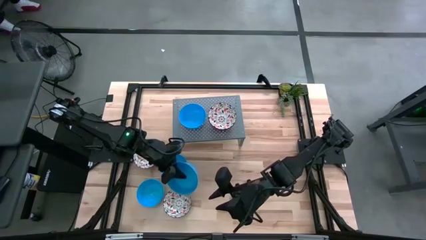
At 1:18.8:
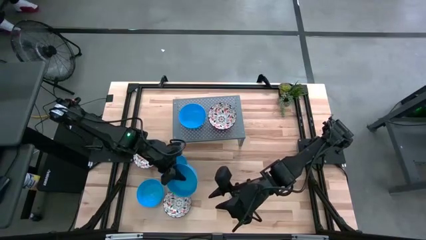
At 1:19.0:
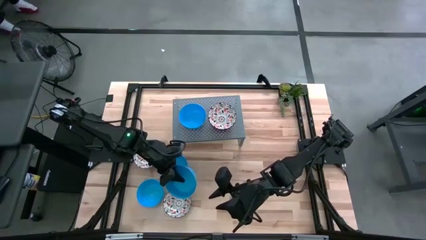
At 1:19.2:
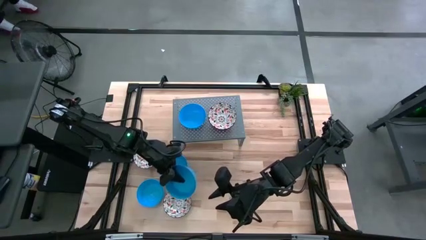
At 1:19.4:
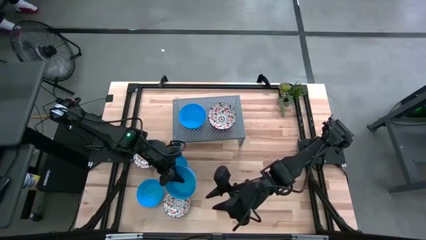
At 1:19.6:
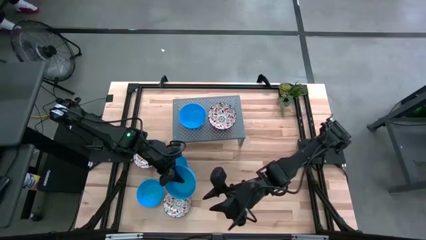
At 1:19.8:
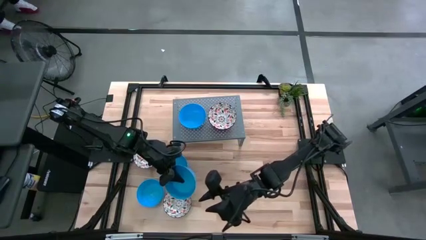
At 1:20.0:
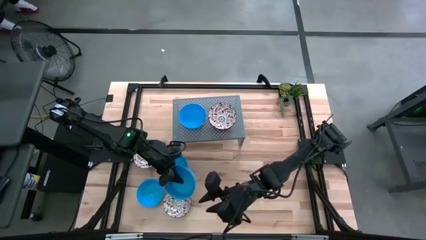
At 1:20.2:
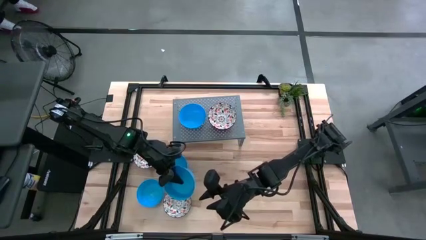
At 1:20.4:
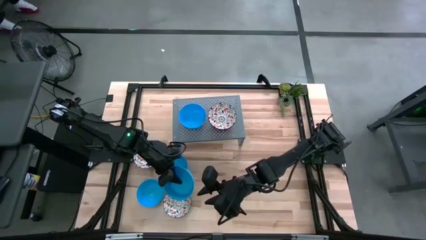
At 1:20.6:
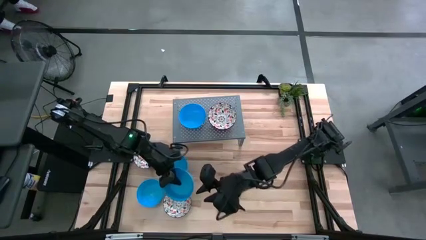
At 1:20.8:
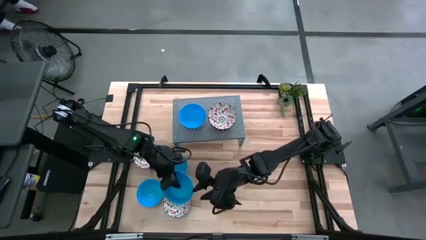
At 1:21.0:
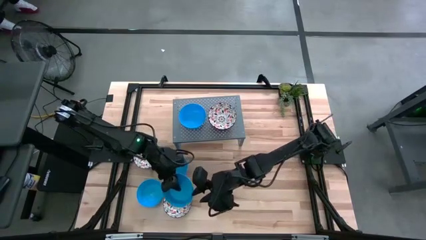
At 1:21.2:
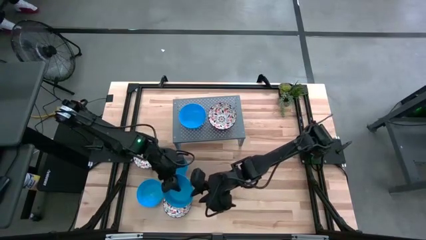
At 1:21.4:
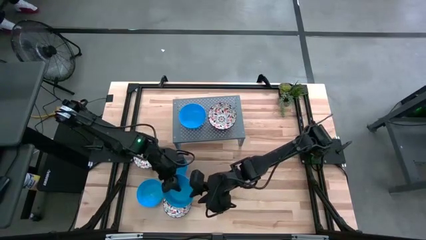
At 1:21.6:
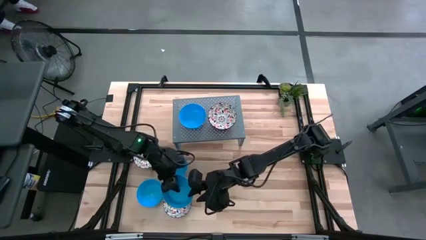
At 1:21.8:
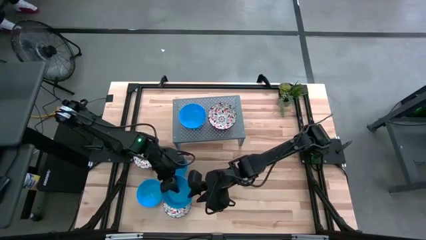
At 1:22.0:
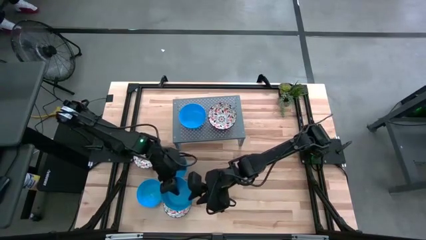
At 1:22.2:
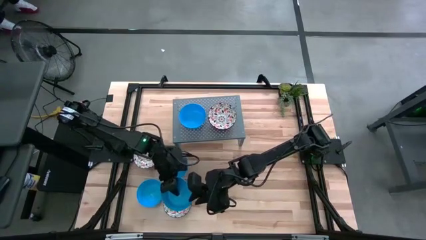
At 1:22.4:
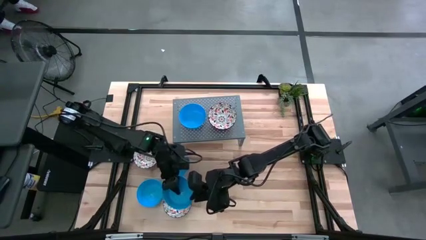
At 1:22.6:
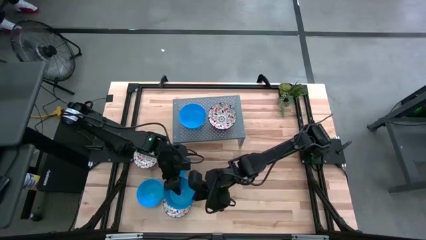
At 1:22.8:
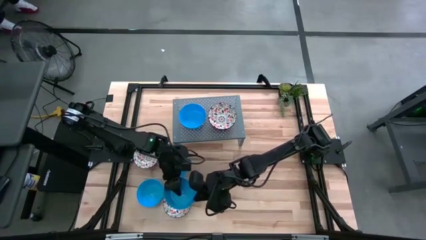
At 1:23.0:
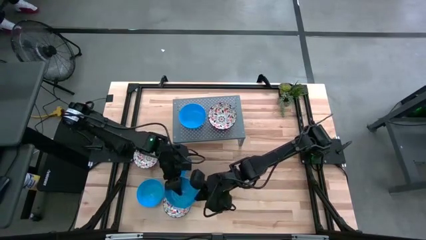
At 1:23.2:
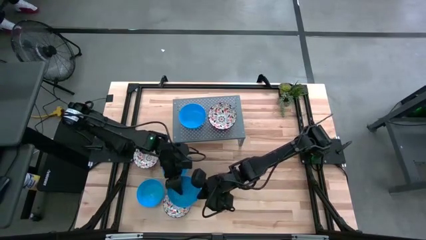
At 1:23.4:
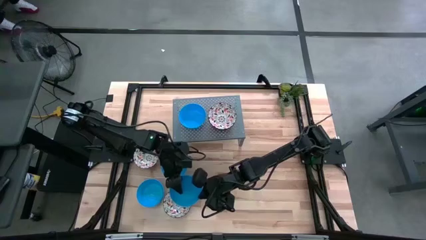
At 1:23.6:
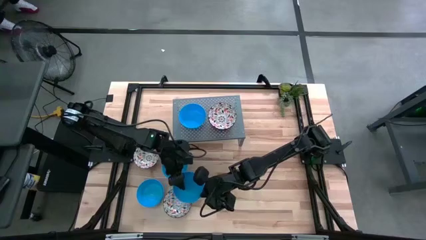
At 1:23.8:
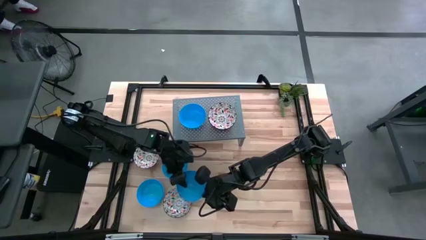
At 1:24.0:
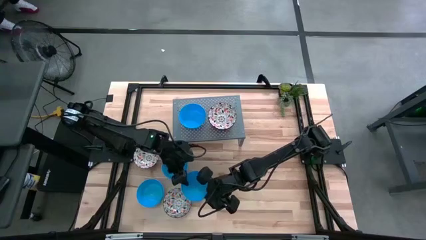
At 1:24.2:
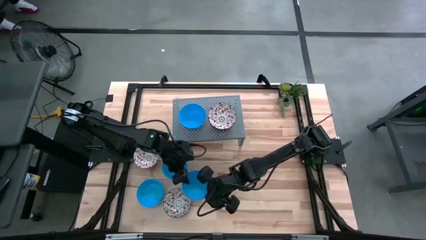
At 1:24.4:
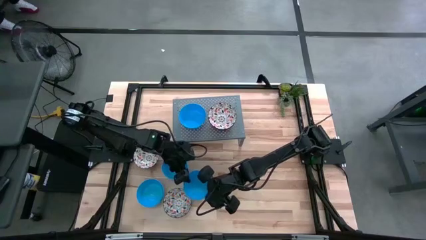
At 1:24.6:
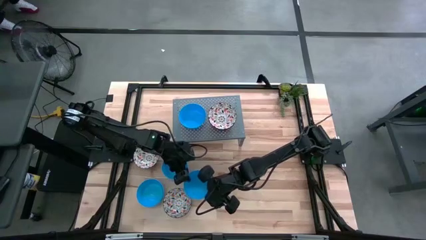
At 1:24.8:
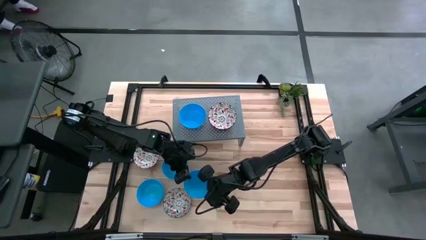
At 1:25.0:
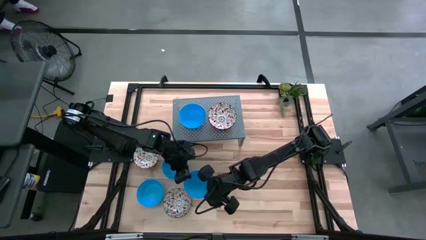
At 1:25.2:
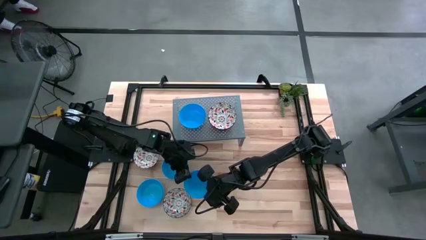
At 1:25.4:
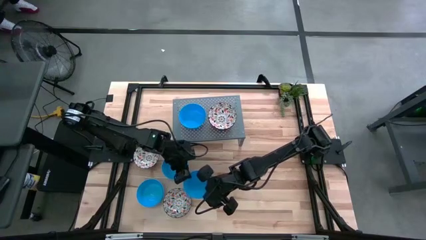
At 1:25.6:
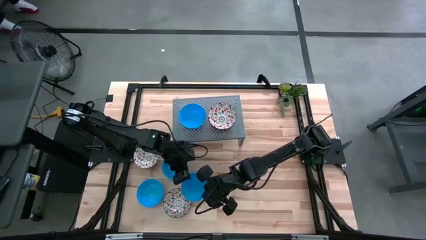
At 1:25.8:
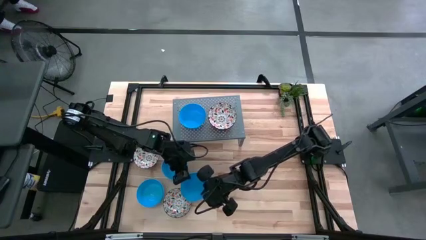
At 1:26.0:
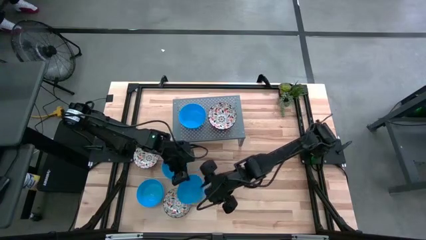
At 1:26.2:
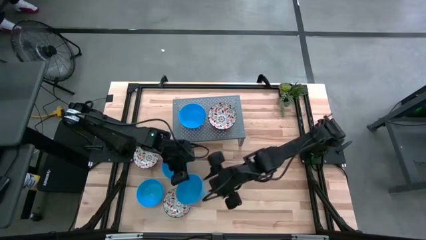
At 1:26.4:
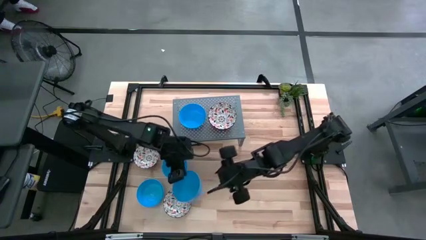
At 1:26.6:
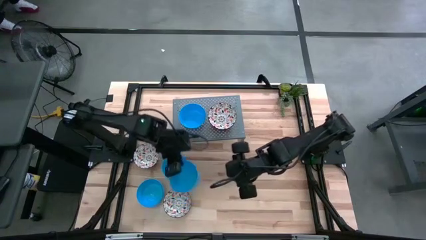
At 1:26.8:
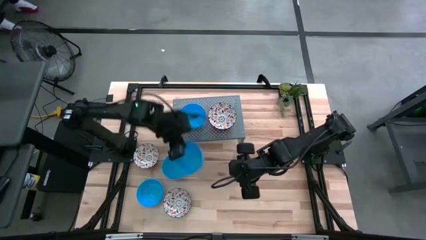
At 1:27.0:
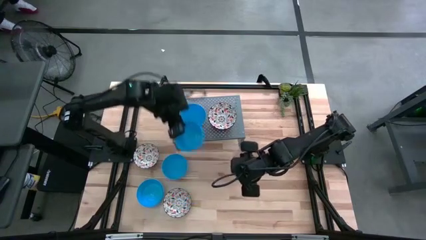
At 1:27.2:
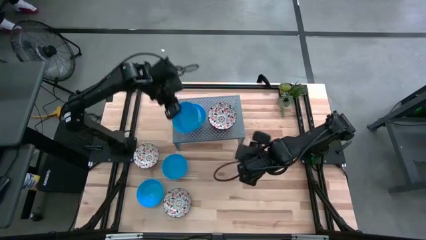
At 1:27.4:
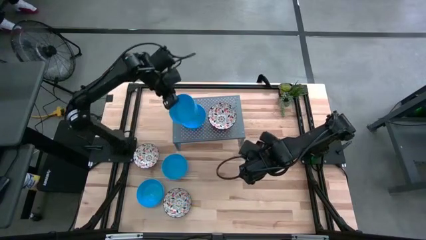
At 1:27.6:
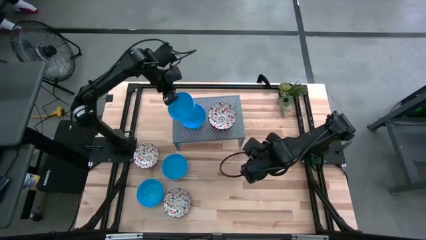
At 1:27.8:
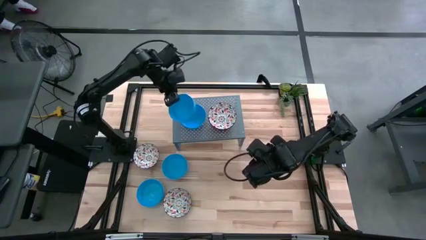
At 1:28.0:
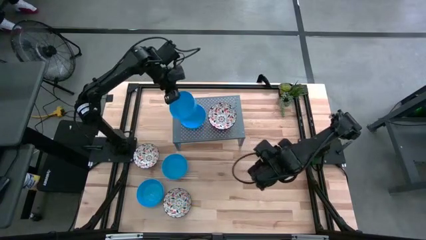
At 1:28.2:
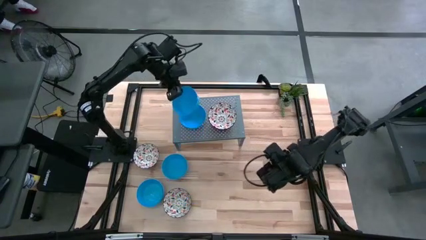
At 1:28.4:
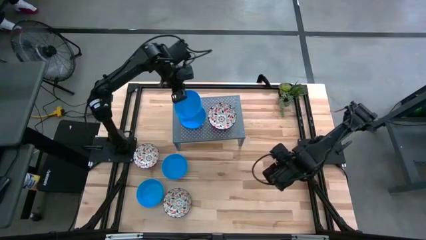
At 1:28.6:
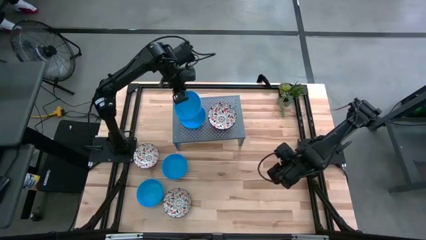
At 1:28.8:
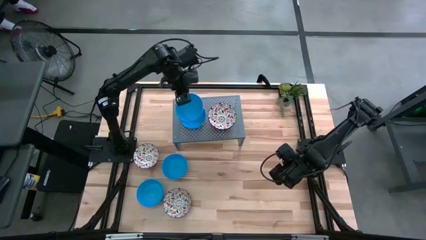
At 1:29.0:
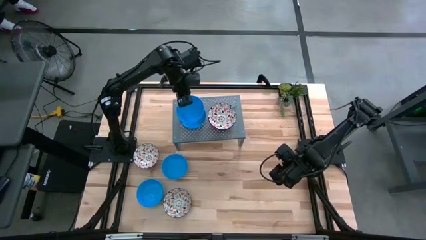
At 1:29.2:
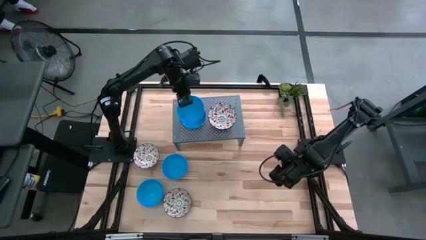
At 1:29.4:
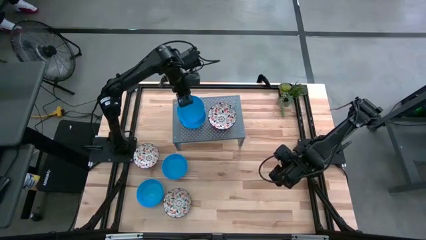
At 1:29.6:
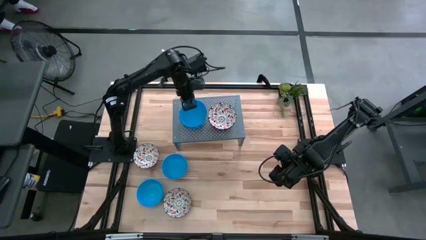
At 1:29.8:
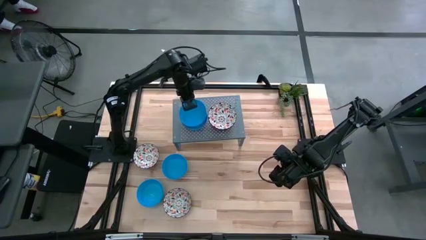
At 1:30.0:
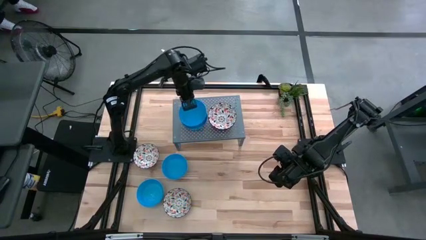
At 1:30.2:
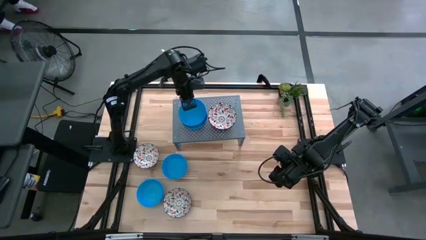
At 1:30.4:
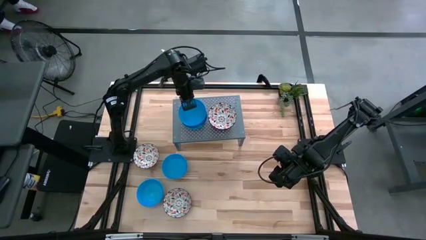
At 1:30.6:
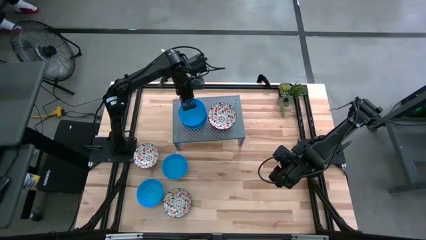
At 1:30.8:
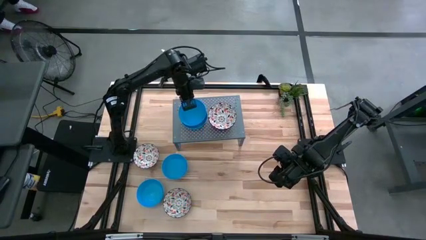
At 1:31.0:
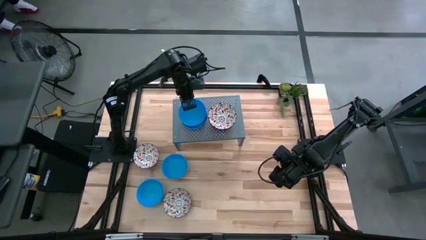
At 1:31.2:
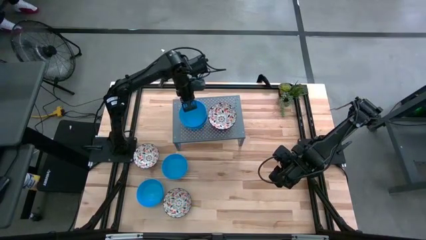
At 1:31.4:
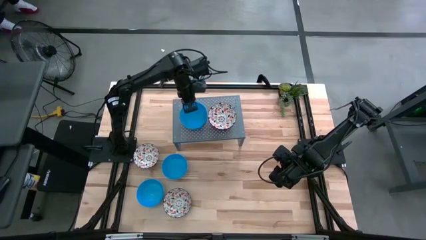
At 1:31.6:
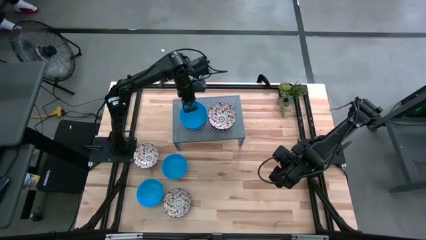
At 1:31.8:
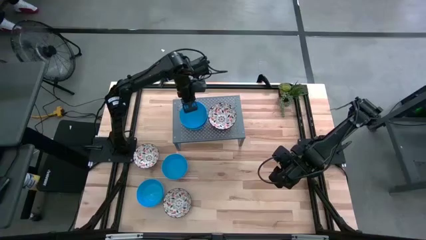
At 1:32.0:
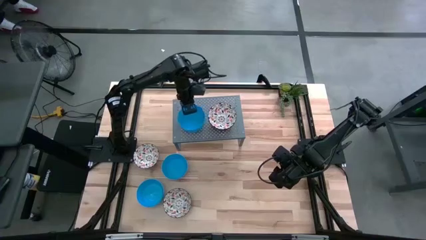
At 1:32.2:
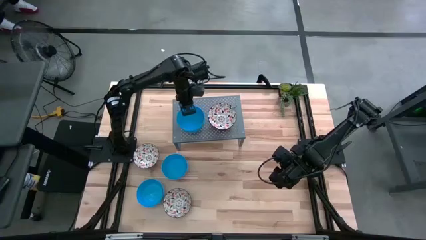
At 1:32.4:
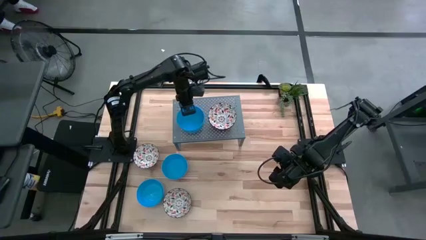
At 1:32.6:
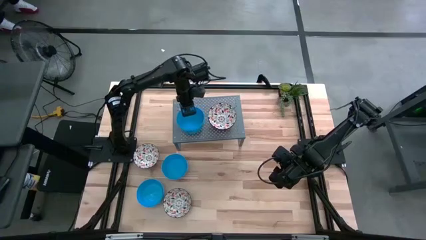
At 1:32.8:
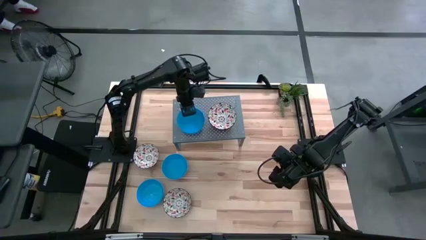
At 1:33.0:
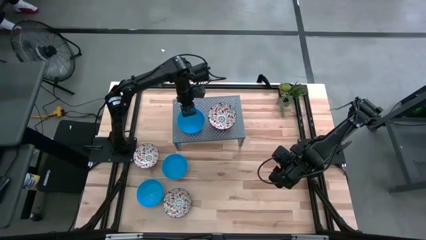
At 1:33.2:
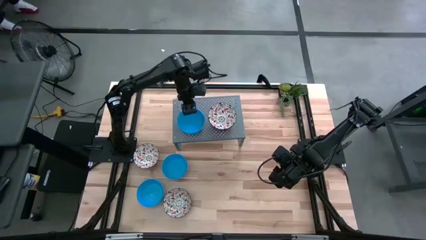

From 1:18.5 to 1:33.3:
Task: Pick & Place Mini bowls
Stack the blue bowl on top of the blue bowl on the shelf

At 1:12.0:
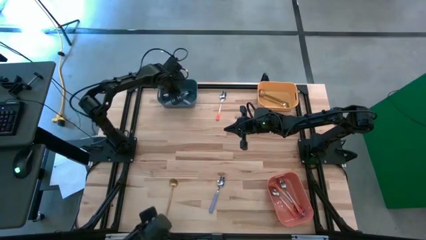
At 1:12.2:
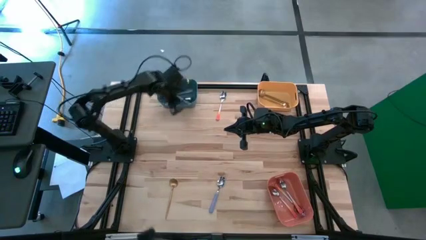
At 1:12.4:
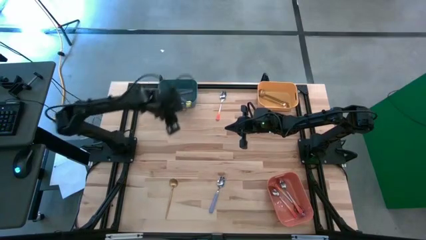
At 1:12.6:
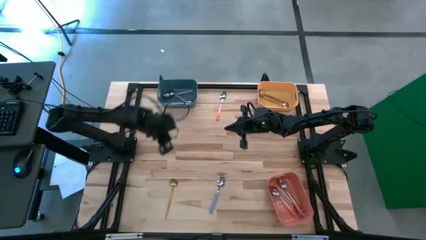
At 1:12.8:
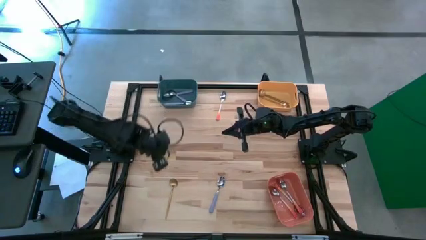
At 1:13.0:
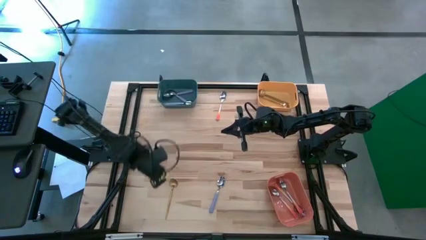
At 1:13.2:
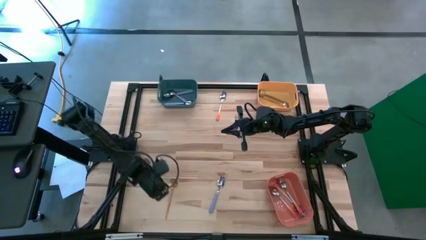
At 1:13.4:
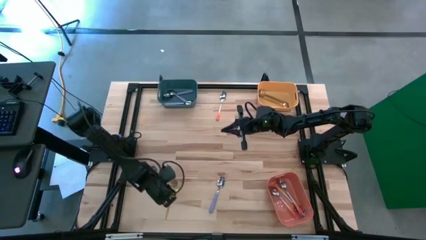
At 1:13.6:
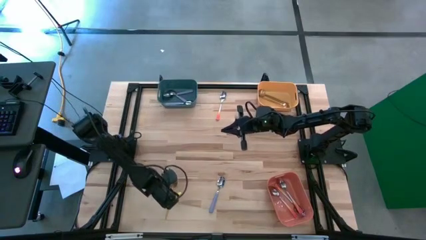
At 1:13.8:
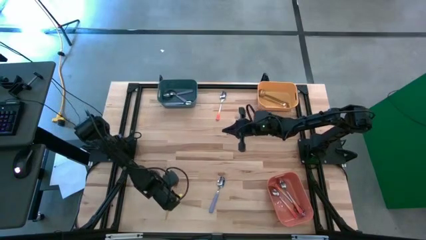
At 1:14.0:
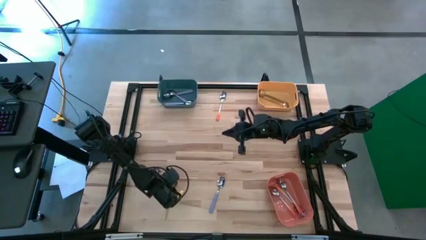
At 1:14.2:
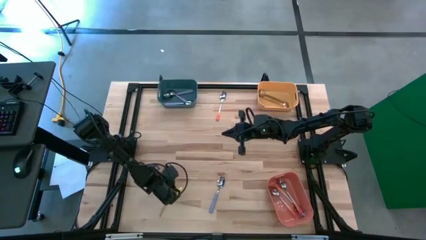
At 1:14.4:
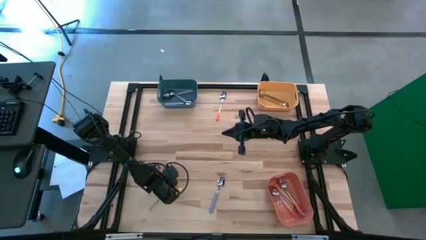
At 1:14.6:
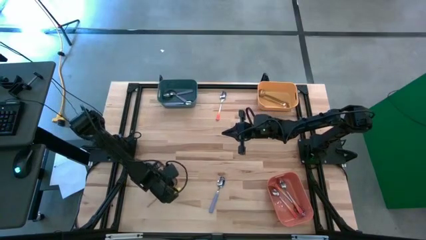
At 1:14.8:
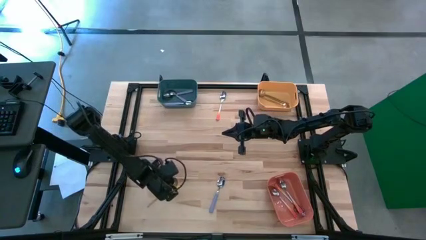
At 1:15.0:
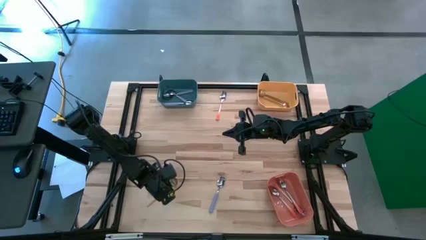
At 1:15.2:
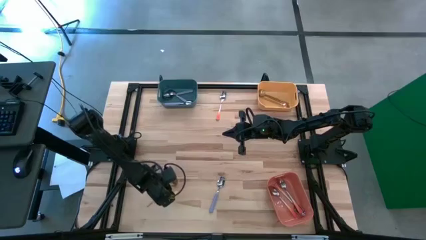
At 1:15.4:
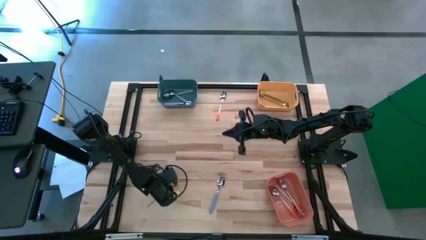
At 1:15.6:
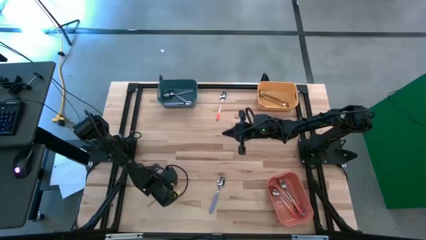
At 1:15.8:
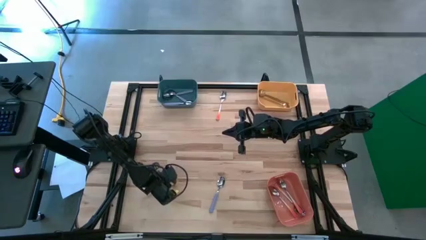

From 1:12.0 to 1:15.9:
Task: Sort silverware by color (type)
Put the gold spoon into the yellow bin
